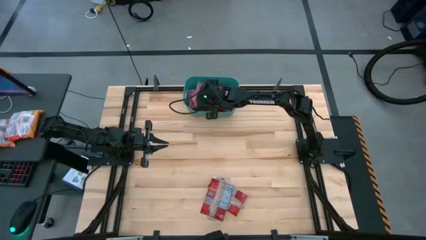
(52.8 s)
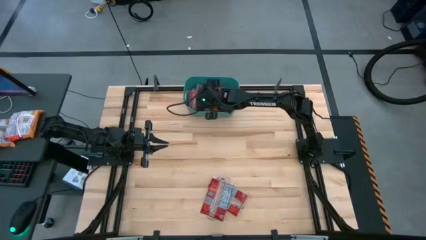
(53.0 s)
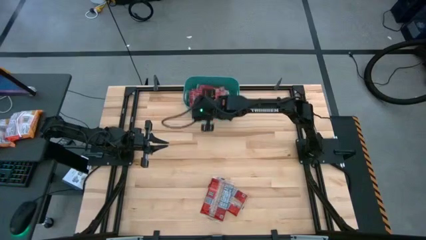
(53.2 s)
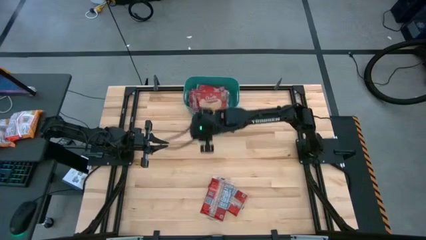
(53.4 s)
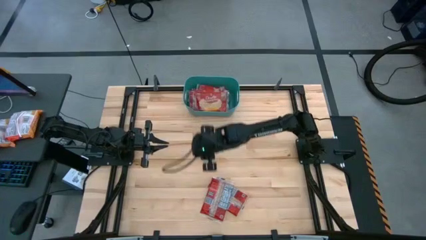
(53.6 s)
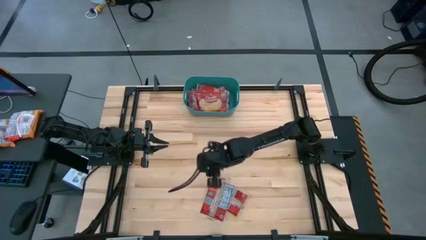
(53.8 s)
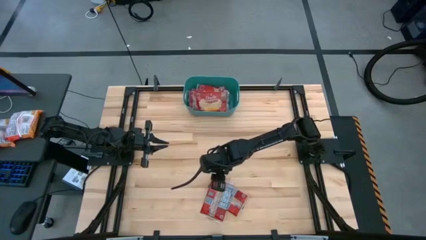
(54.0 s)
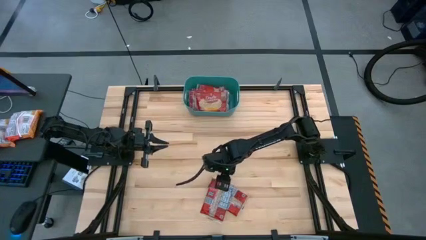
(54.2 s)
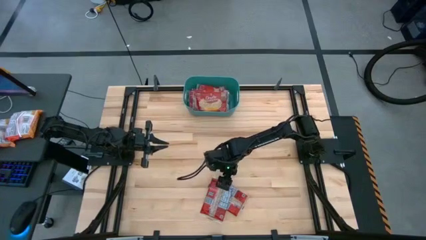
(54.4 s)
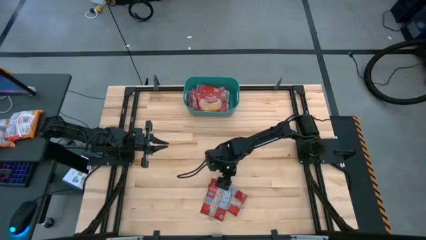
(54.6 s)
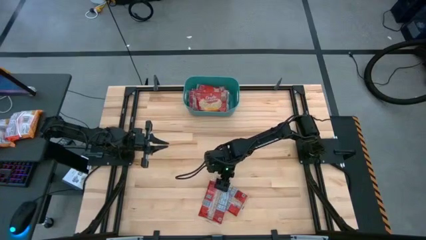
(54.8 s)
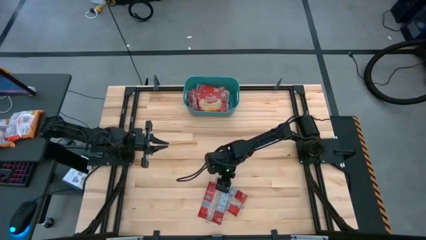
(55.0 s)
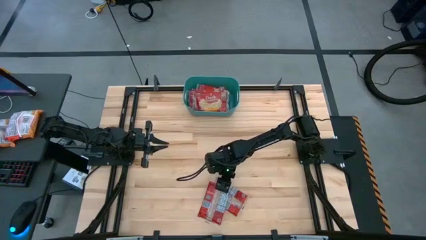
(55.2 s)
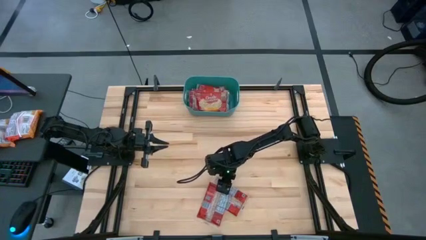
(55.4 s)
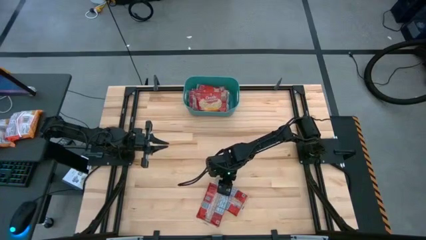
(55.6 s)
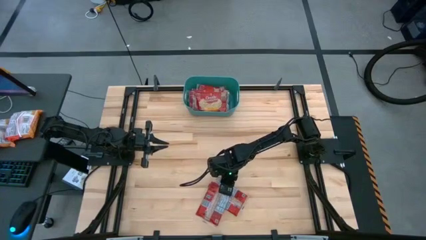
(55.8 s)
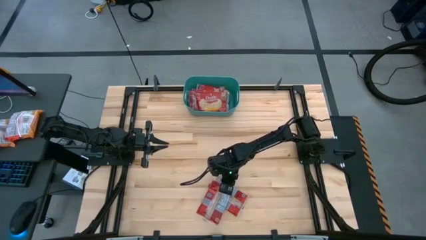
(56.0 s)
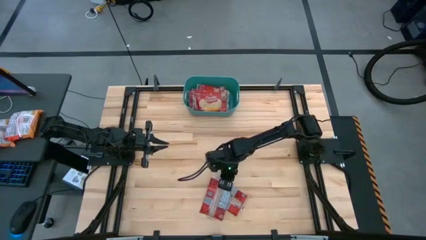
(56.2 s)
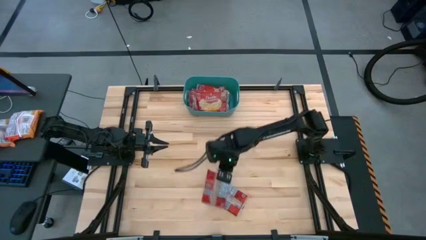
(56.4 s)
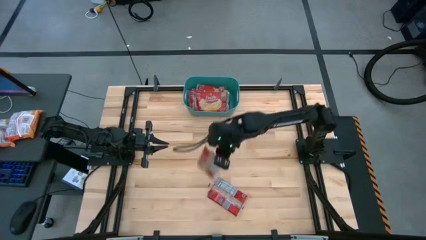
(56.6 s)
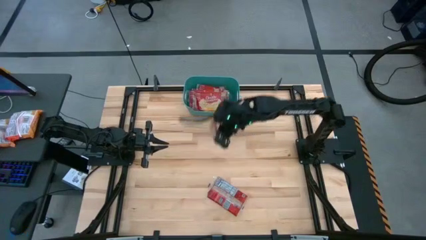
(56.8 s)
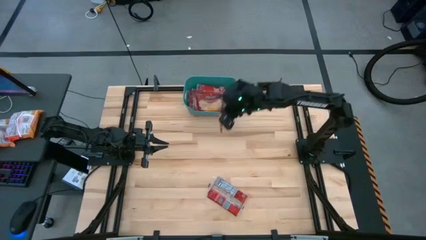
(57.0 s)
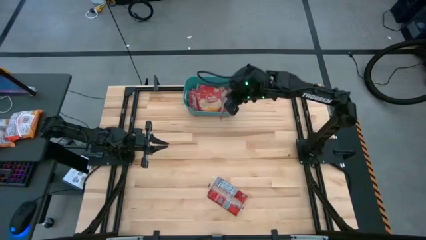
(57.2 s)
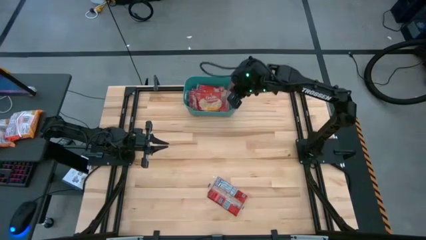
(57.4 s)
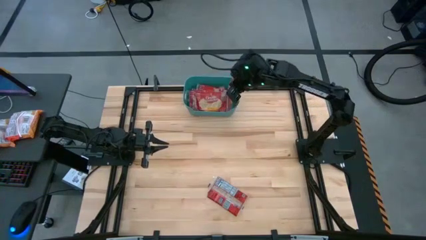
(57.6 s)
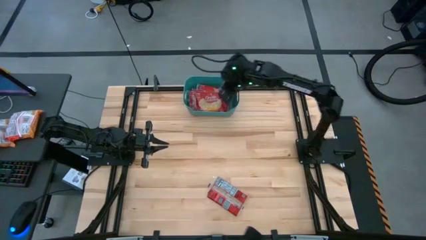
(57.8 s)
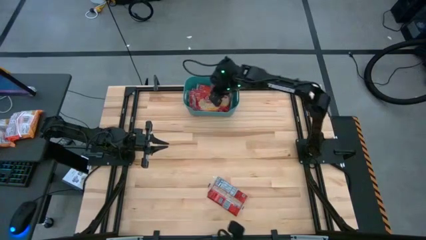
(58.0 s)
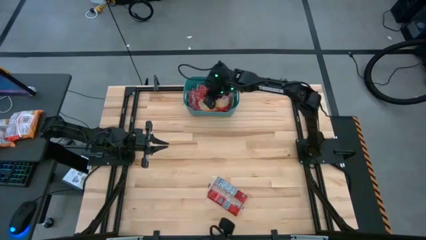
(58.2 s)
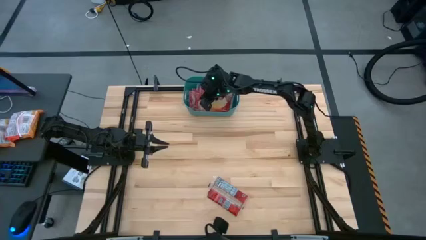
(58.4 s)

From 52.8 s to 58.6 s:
Task: Sort popcorn bags into baskets
Put the popcorn bag into the green bin

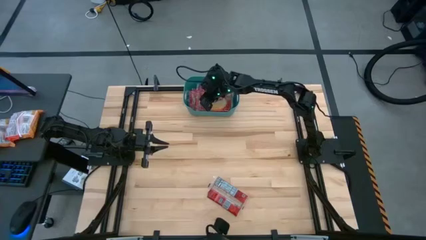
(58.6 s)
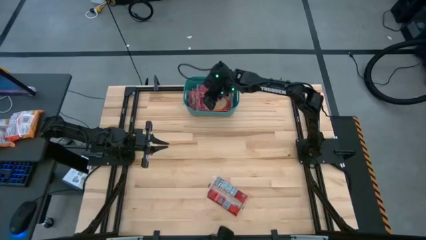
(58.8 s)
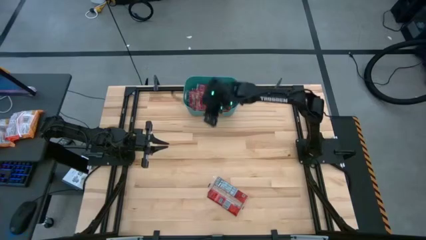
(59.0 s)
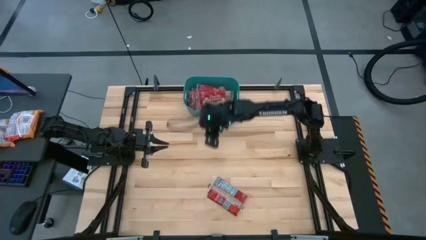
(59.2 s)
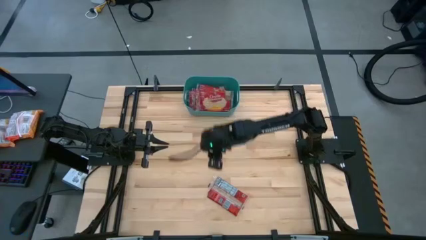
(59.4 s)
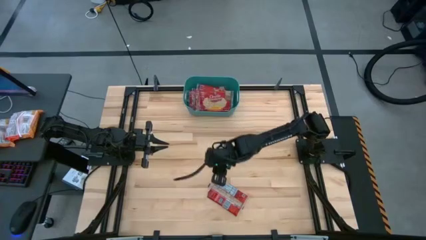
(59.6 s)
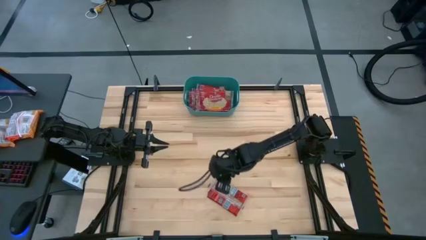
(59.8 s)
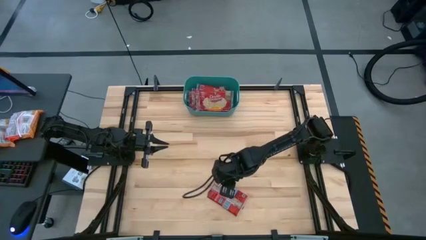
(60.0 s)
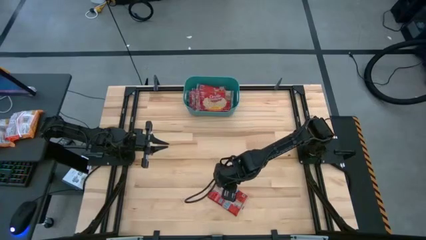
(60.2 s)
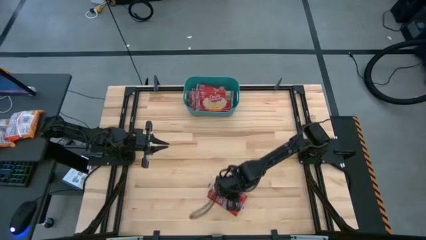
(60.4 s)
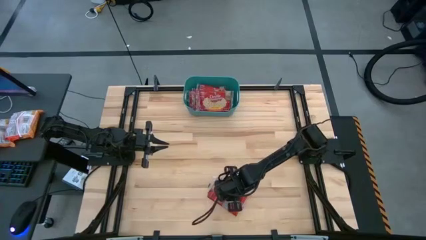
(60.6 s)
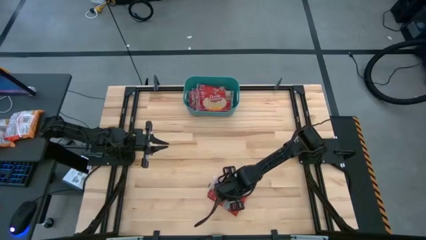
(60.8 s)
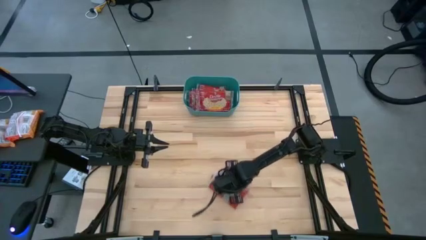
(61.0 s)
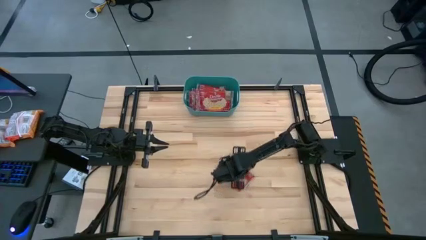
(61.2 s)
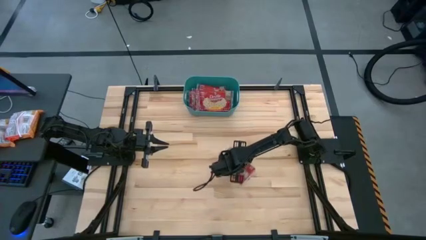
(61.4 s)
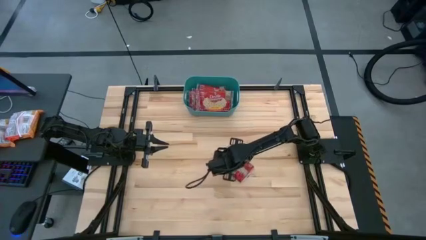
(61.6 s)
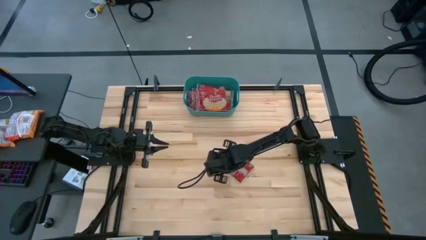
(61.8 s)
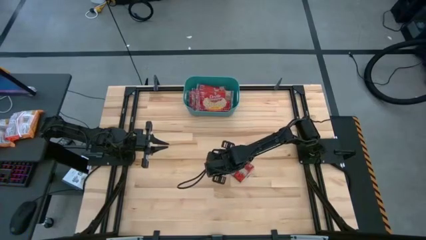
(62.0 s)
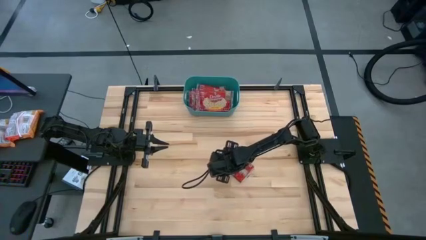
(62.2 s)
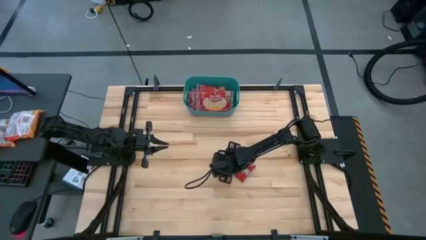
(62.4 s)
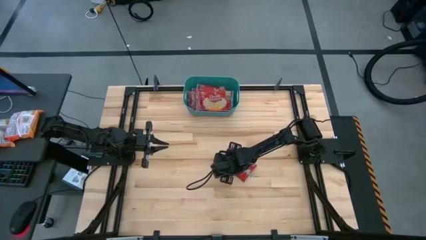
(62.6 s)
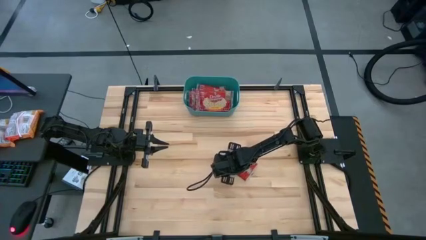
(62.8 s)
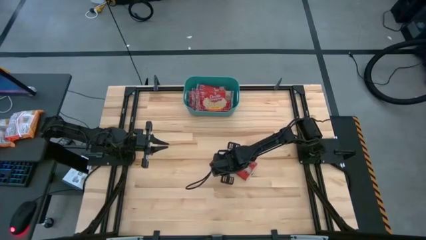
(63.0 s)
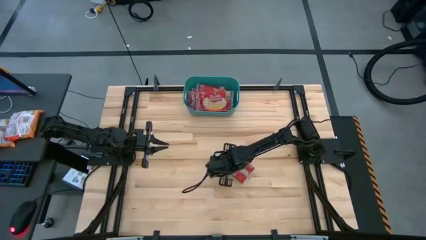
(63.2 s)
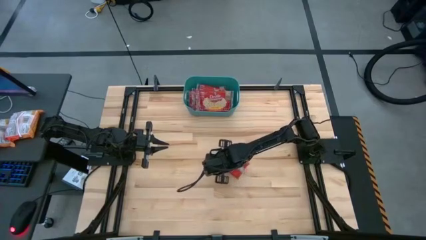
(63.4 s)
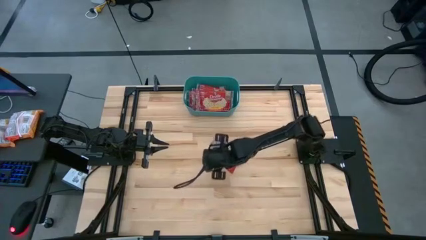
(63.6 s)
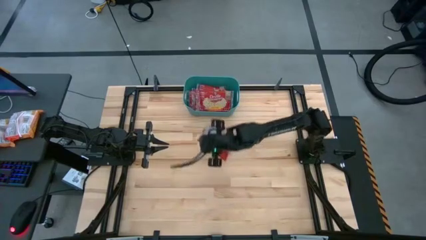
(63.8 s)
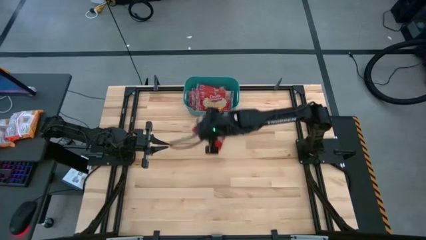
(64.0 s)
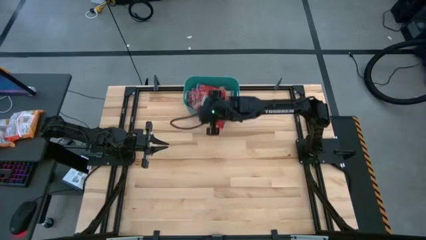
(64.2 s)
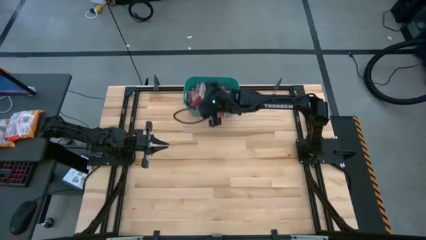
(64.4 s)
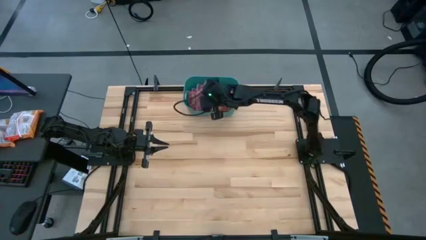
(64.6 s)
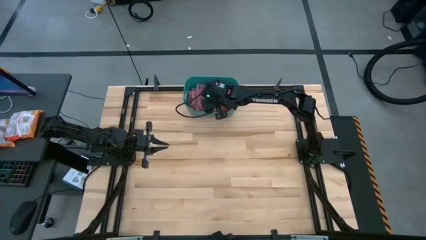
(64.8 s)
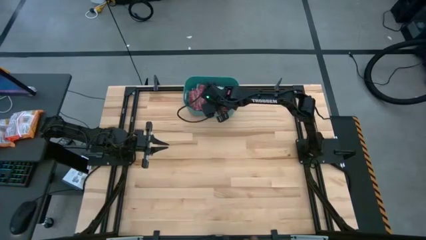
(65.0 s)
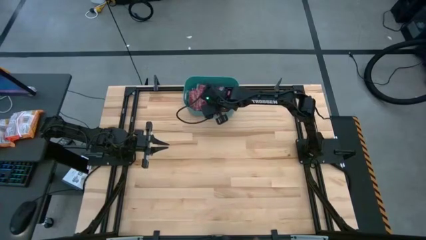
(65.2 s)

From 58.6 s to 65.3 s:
Put the popcorn bag into the green bin

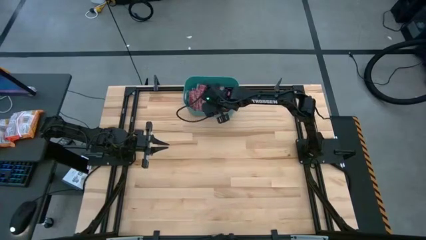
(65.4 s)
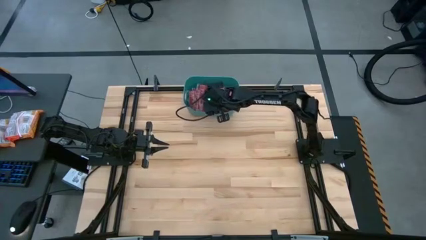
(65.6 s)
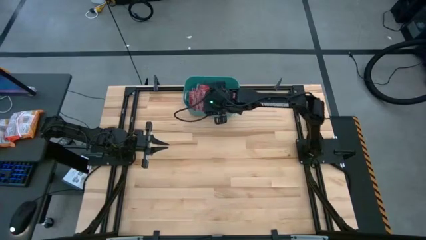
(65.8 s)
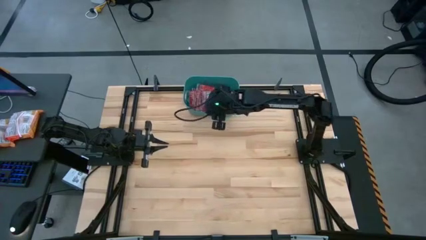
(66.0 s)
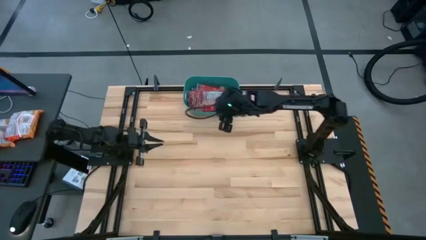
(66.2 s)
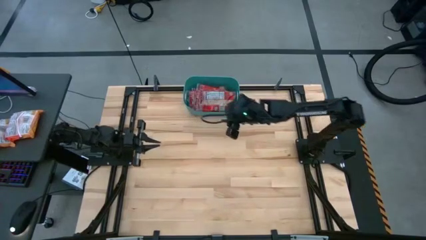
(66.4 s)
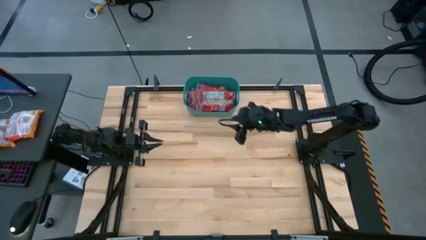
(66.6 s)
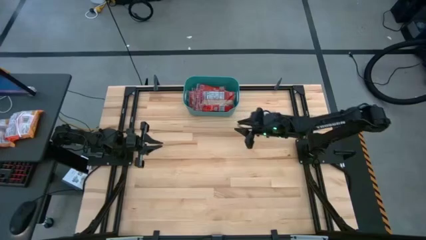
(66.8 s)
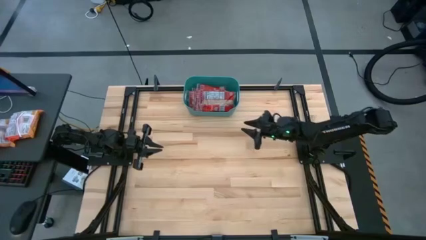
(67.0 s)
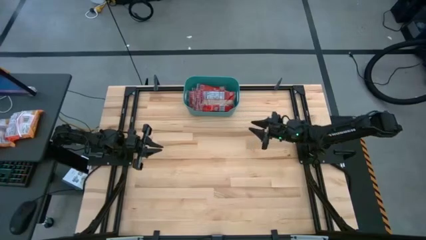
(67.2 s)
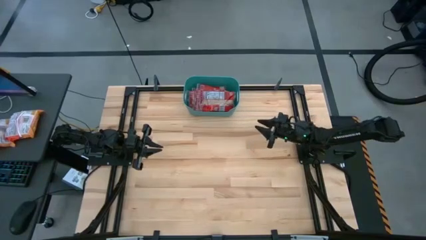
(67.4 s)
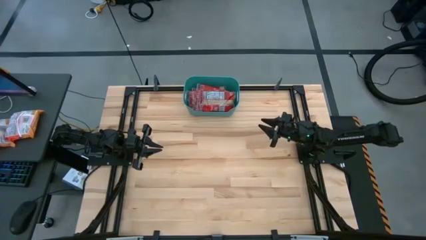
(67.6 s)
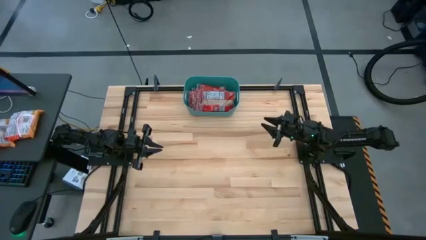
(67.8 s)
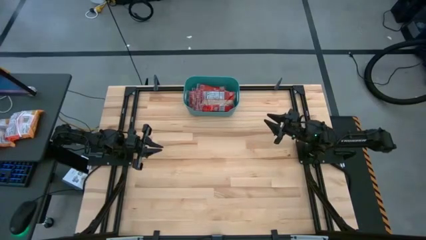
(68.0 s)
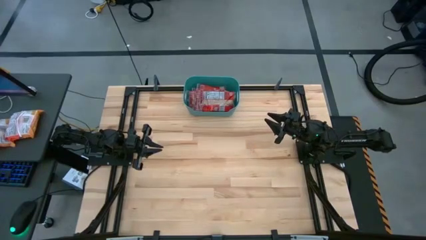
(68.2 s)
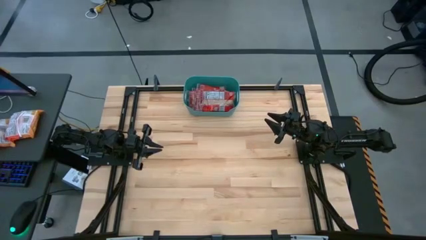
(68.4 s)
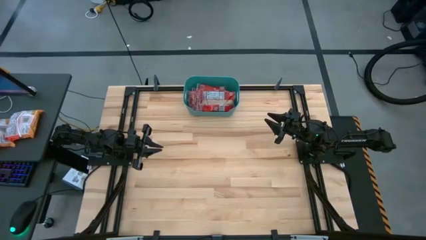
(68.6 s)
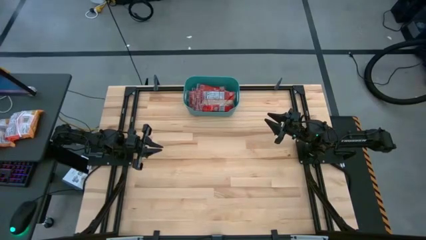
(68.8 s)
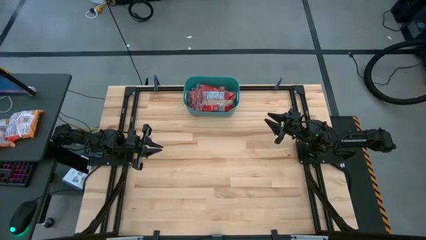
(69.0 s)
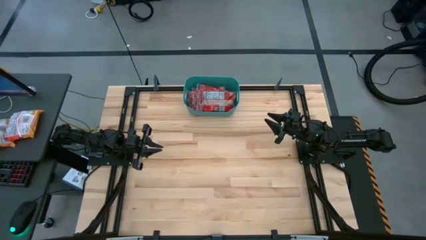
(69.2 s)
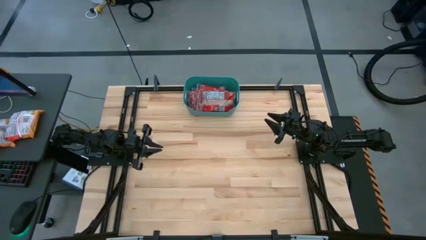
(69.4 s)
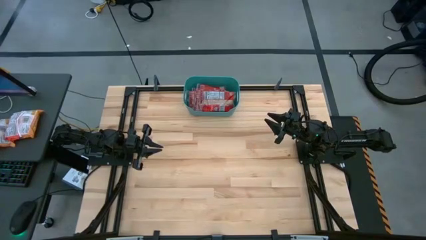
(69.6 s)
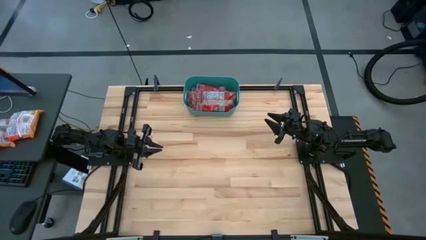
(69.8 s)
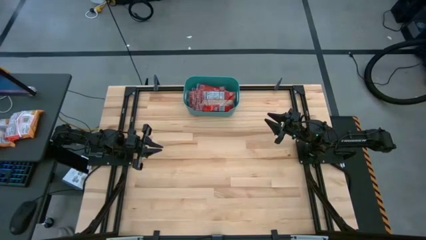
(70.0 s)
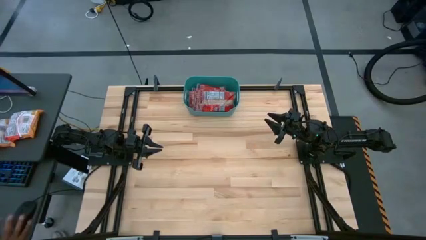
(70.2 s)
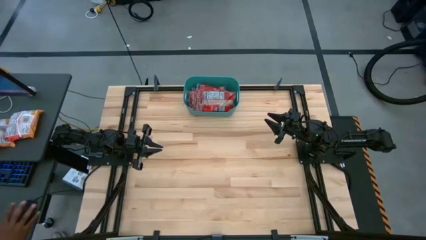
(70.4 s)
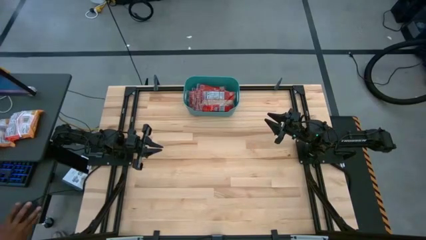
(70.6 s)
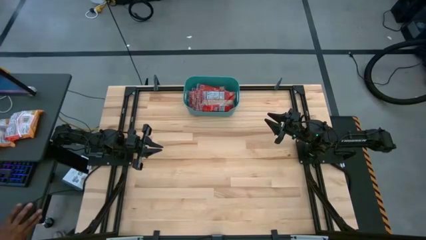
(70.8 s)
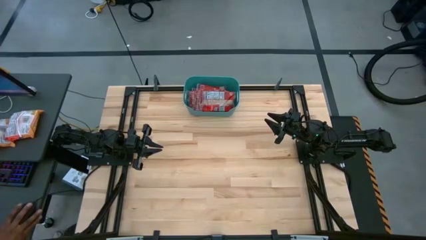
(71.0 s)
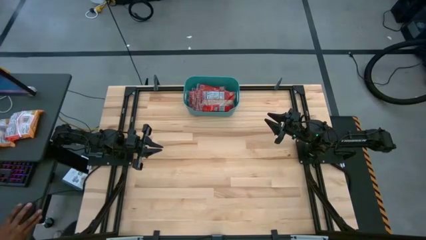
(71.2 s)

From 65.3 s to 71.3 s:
Return to Home Position
